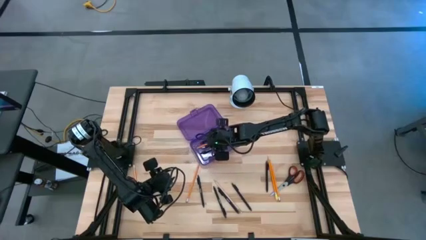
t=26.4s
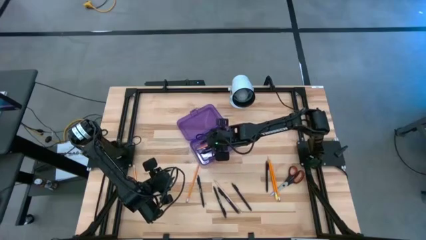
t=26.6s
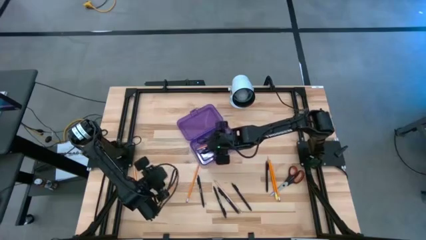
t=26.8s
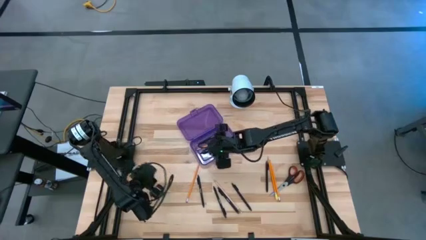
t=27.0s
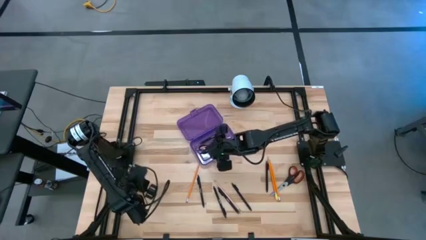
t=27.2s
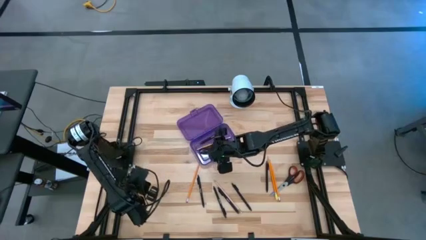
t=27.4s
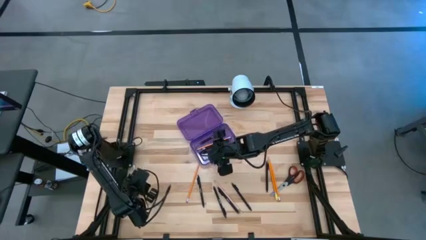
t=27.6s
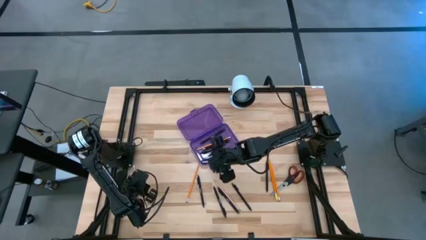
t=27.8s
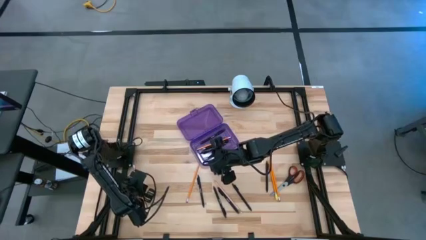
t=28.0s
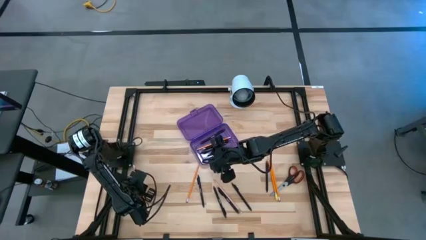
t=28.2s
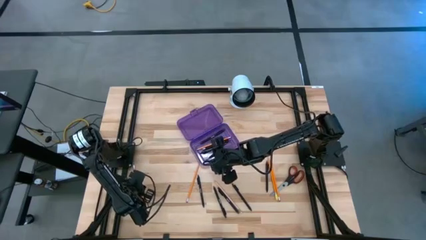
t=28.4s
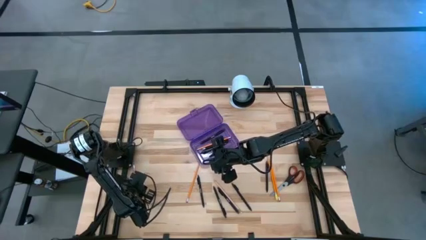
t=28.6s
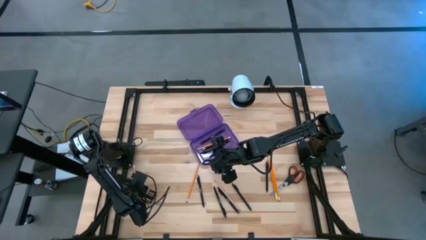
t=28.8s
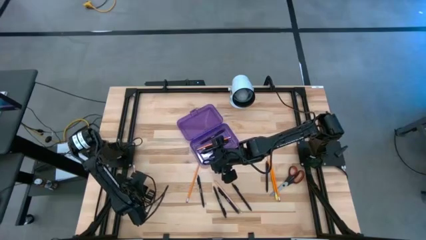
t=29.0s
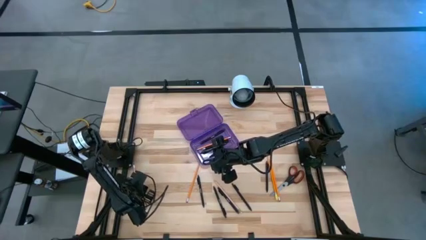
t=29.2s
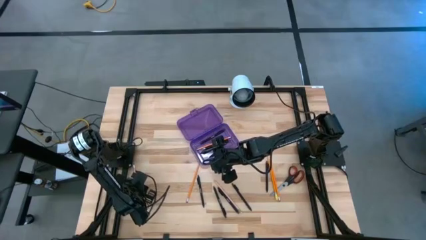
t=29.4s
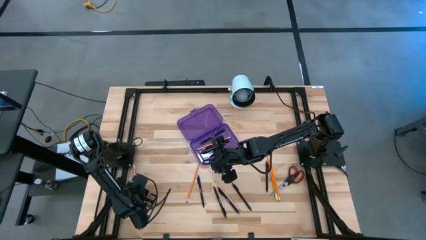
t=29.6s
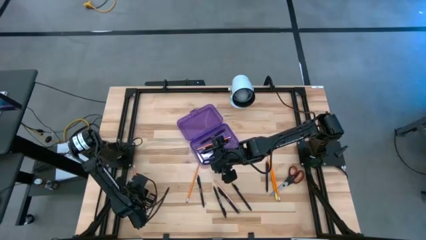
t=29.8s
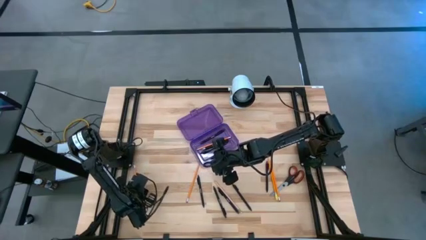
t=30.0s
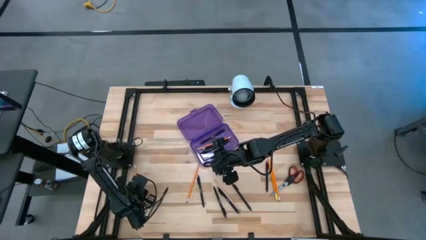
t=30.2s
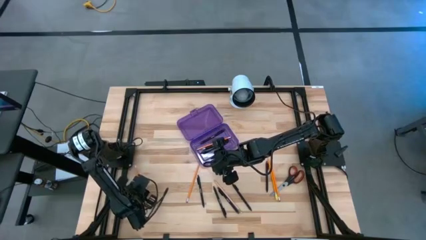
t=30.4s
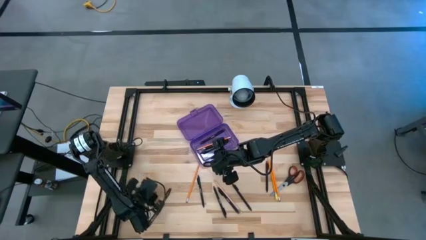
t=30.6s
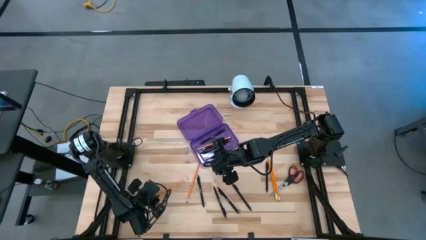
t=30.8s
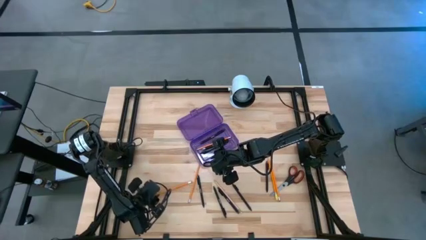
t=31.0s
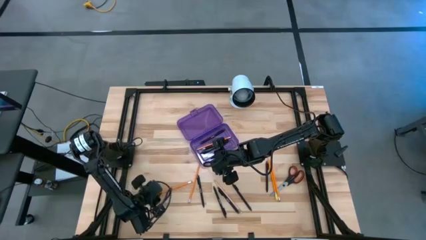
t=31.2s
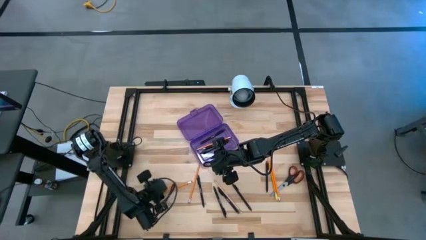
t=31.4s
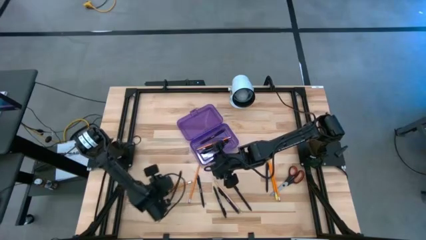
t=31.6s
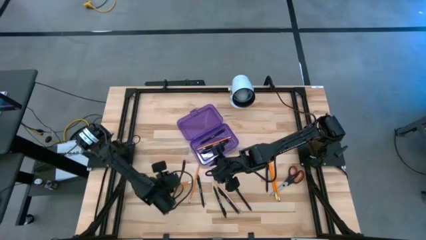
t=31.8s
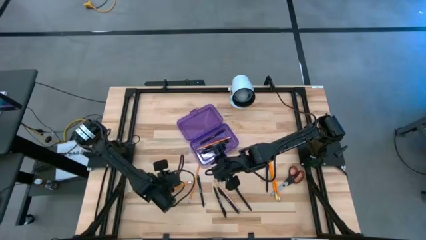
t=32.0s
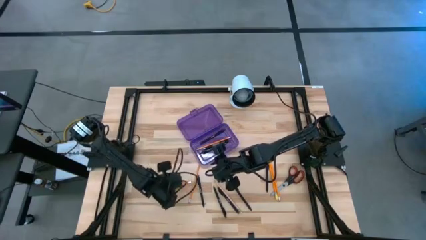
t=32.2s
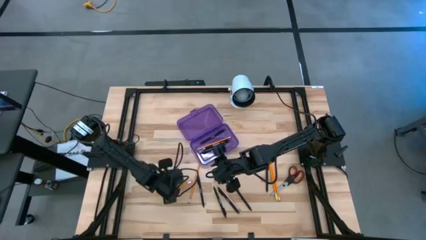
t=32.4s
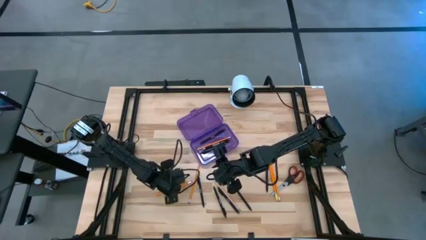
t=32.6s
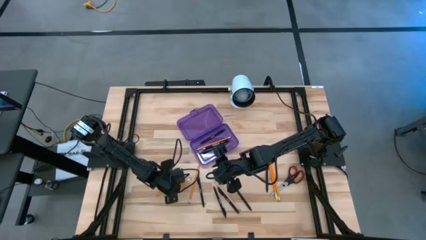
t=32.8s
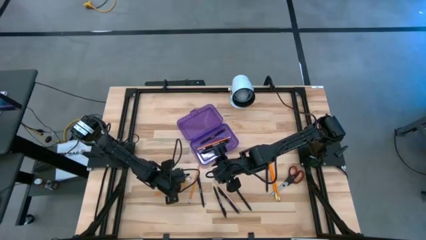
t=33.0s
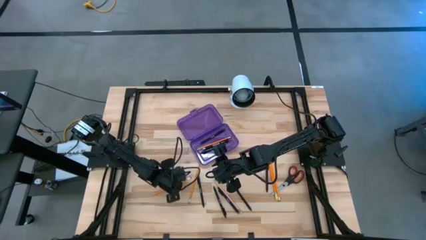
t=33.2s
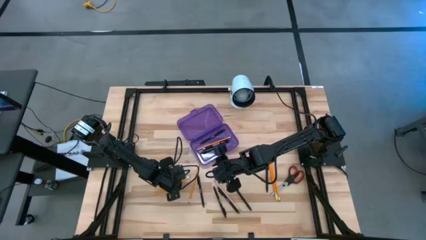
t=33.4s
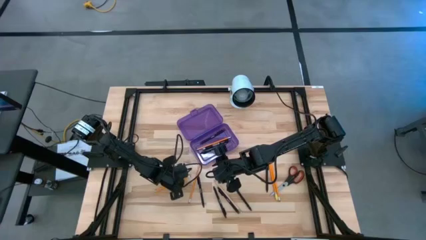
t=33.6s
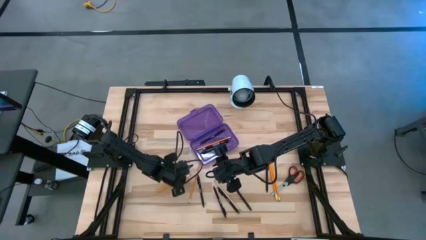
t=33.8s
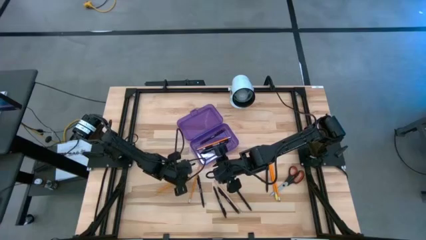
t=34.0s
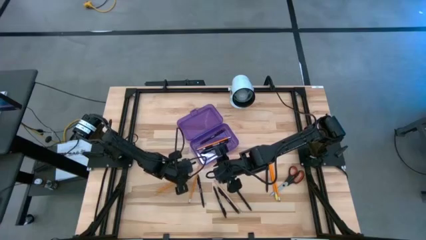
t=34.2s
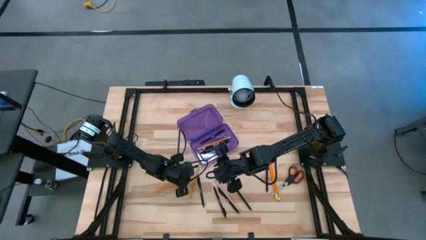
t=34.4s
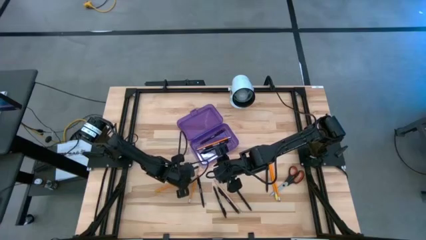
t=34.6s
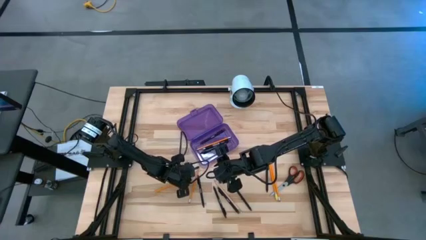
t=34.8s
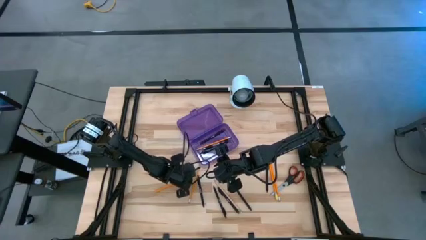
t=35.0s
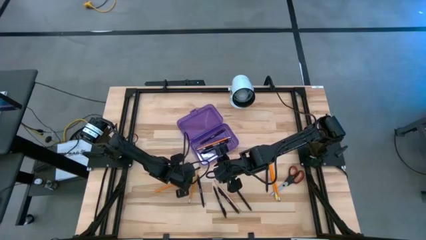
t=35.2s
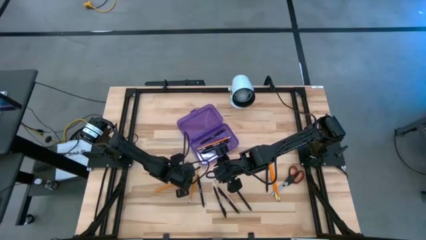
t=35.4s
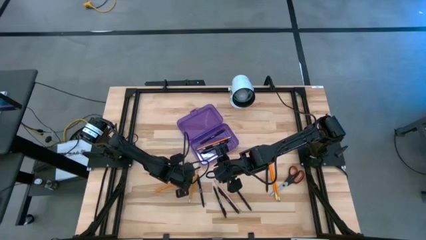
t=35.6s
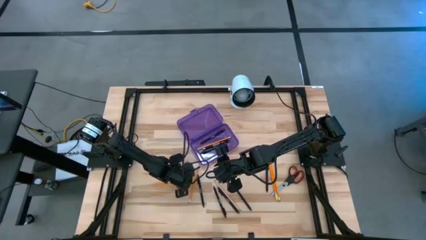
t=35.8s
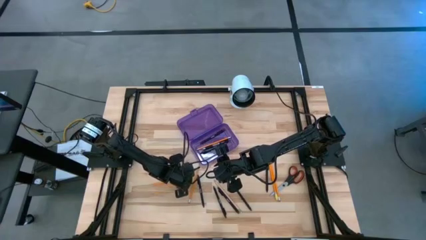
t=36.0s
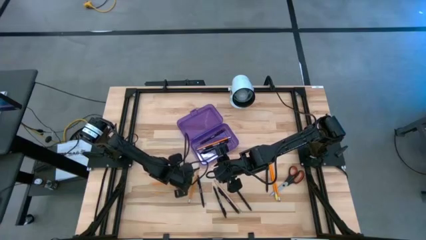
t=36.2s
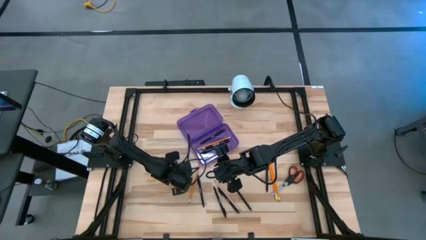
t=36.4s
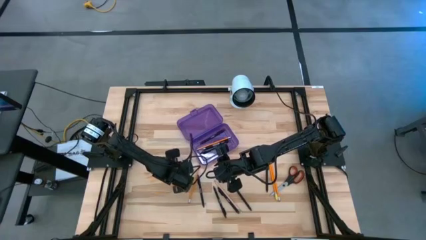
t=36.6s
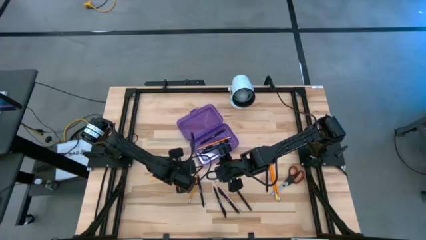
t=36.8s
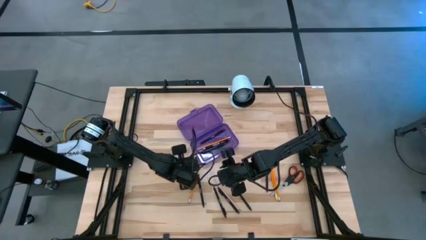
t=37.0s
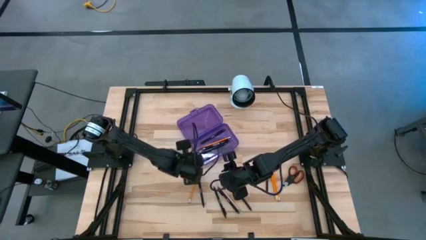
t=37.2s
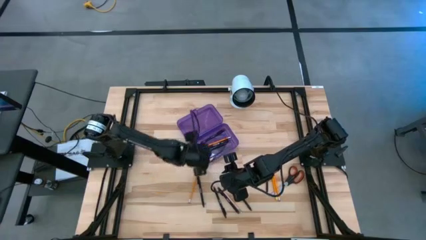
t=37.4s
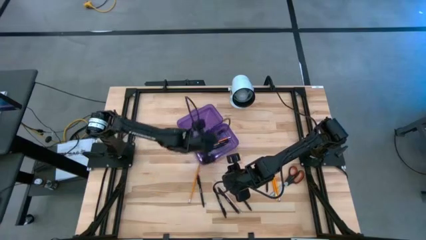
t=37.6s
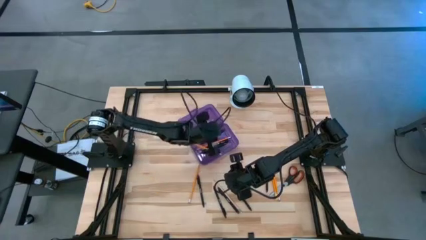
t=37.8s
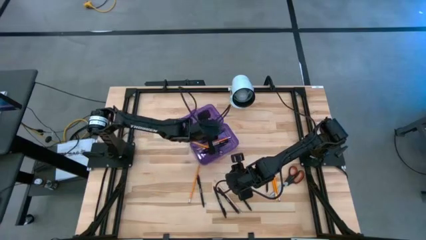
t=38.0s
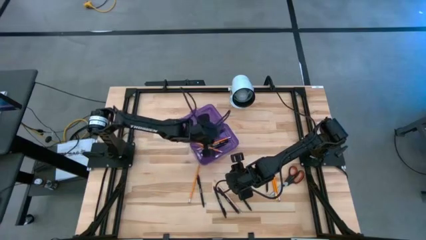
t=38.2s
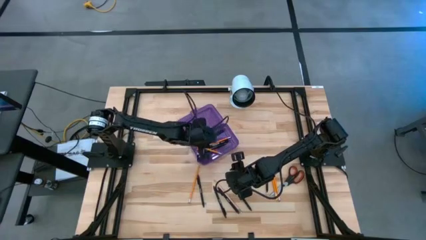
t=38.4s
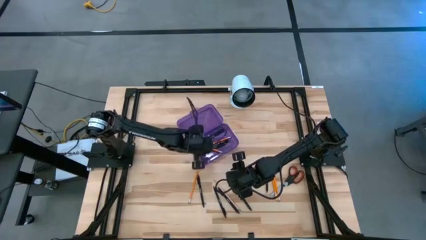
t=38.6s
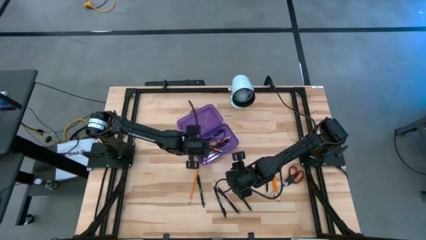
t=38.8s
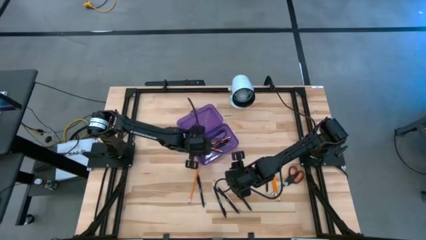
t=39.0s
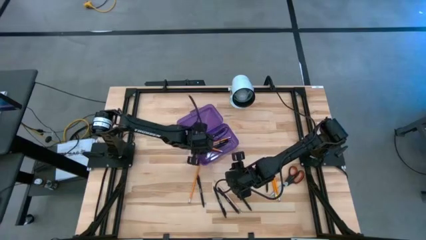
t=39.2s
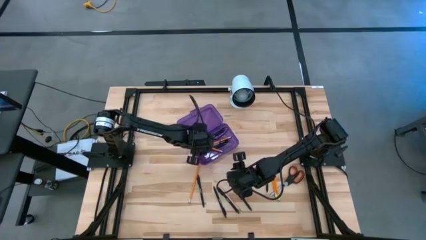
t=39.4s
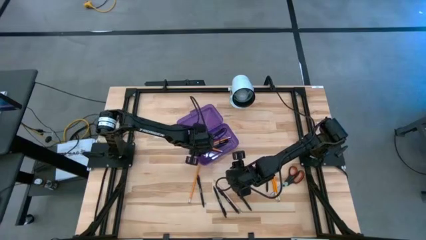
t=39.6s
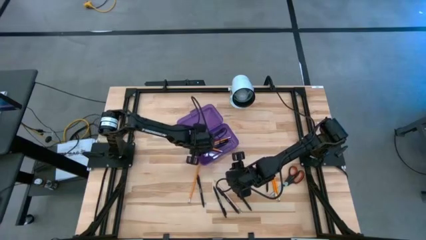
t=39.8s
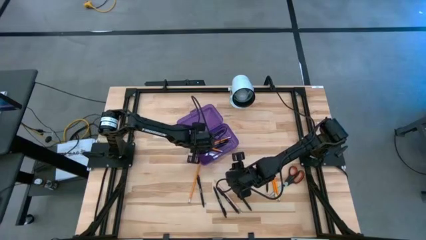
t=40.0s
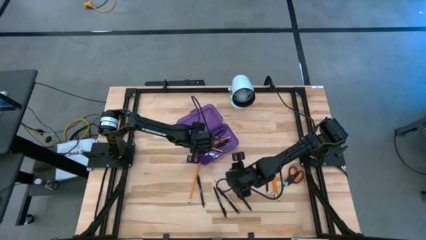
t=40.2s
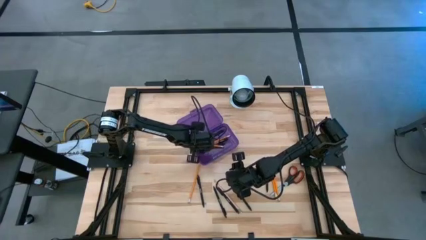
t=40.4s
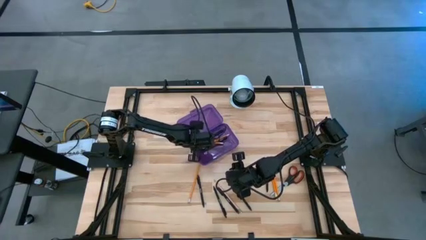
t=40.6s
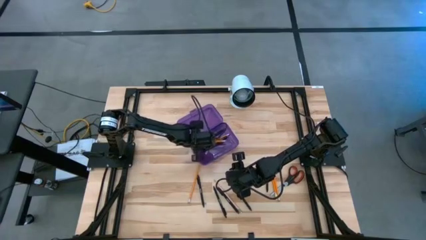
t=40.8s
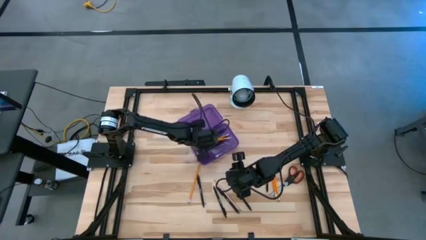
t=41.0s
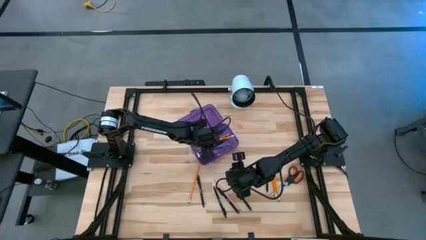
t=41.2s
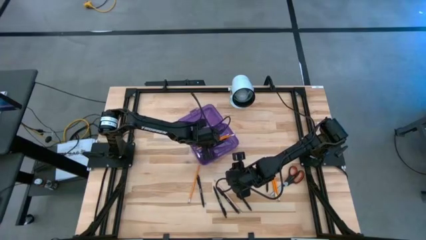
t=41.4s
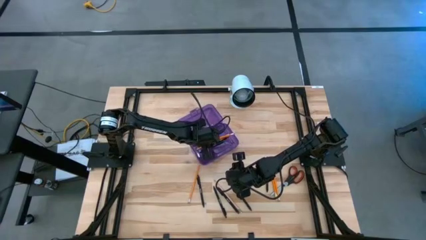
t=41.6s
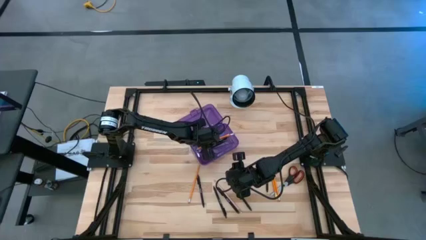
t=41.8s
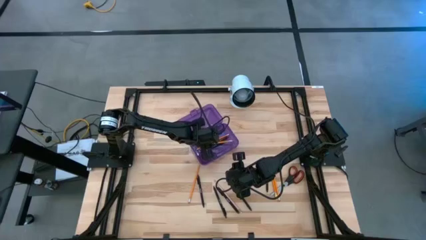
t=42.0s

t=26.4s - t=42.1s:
Task: Pick & place school supplies into a supply box
Put the orange pencil into the purple supply box

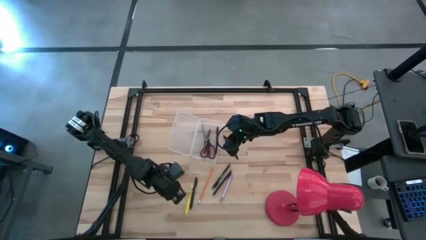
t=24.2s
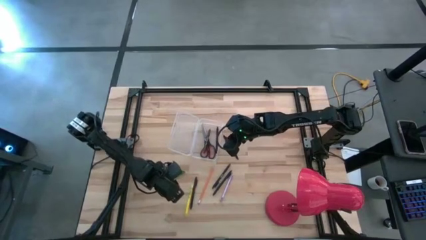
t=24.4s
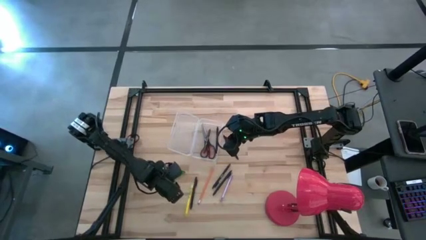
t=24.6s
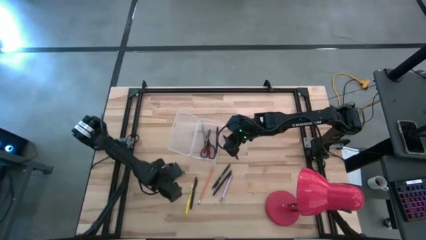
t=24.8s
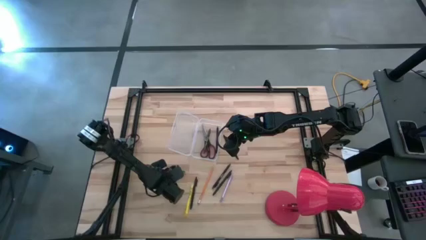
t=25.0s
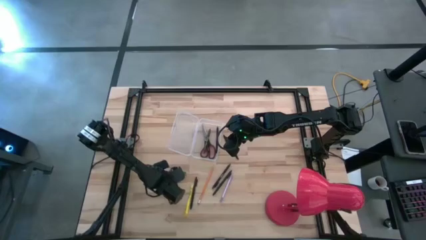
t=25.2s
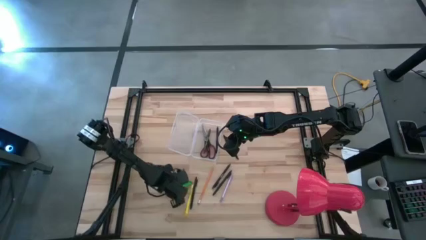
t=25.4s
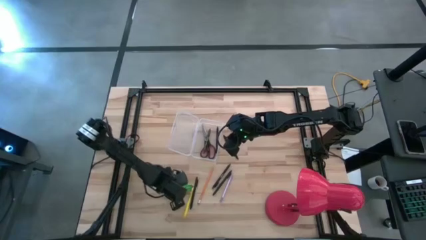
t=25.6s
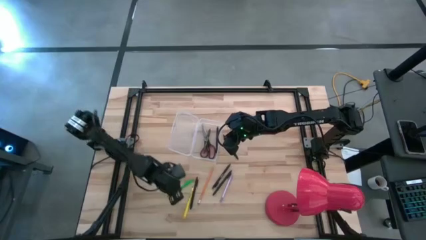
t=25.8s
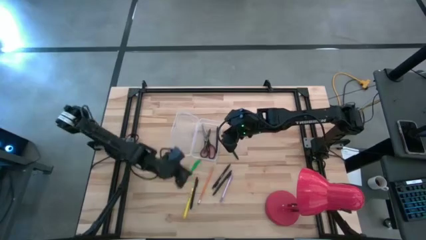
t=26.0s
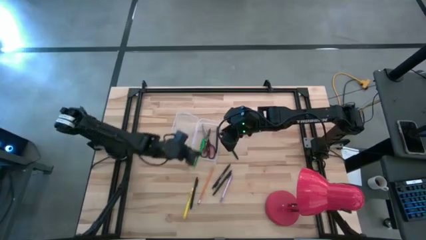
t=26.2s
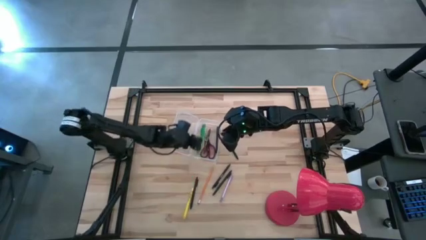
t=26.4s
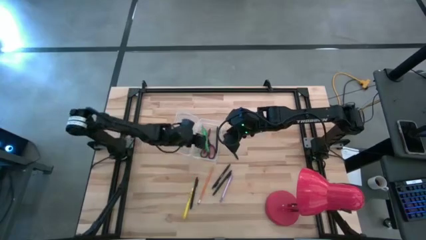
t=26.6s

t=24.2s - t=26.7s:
Task: Pick & place school supplies into a supply box
Put the green pen into the transparent supply box
